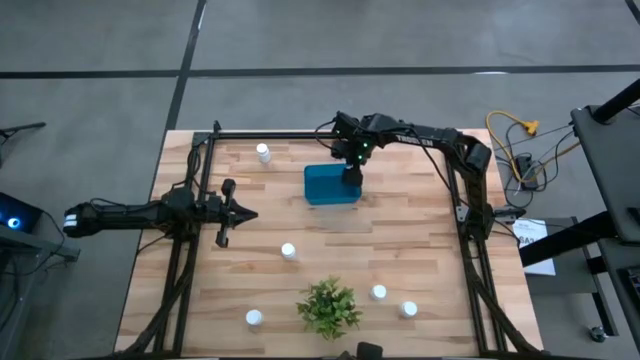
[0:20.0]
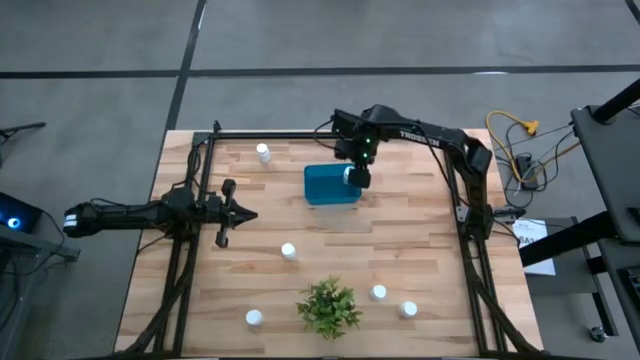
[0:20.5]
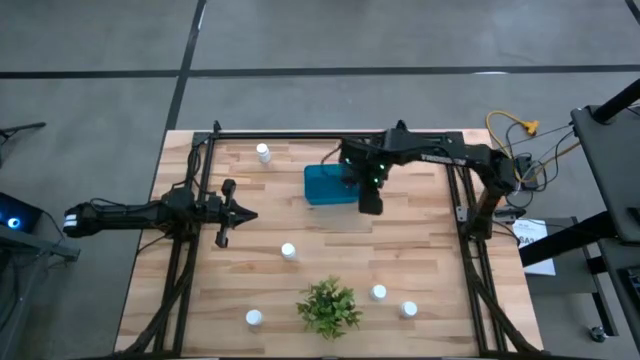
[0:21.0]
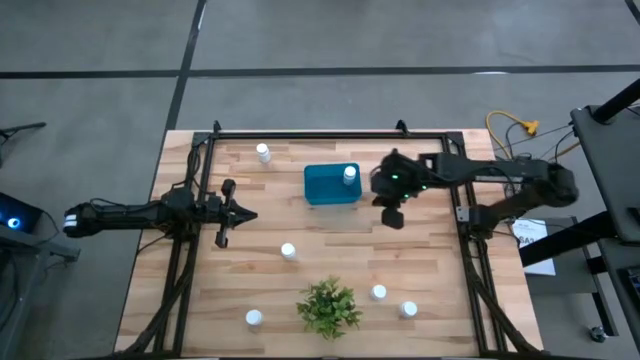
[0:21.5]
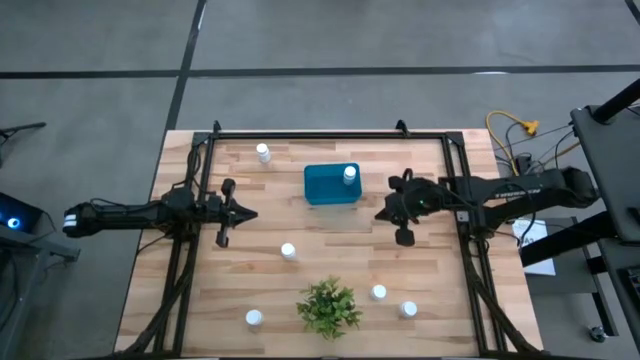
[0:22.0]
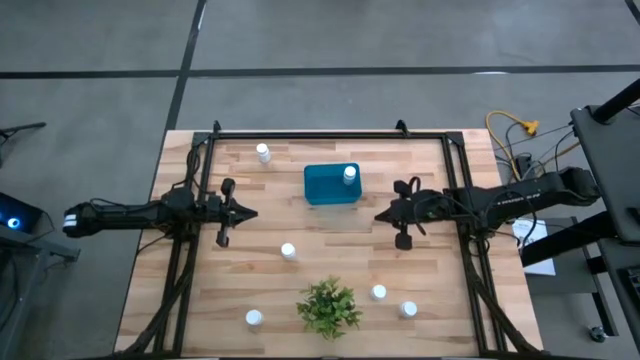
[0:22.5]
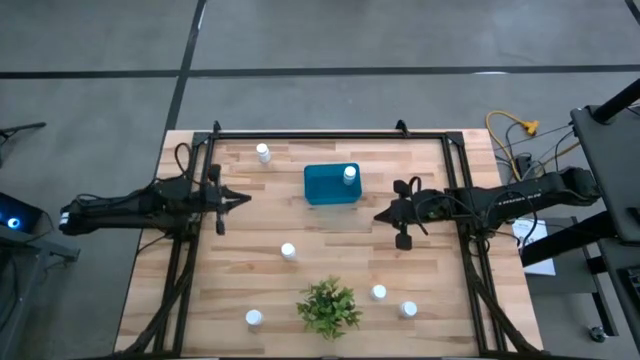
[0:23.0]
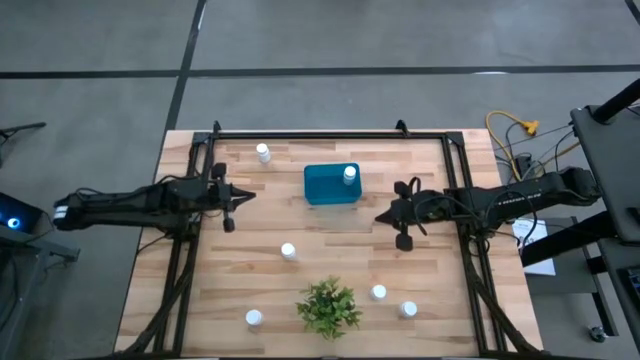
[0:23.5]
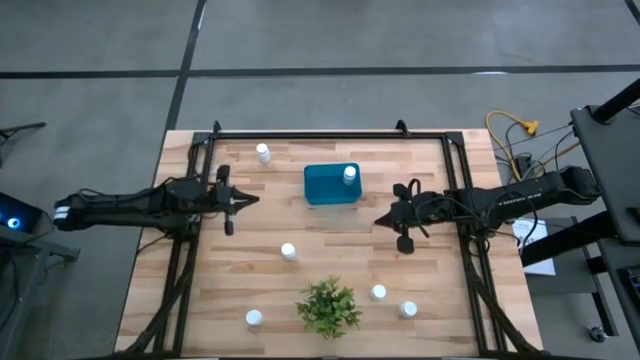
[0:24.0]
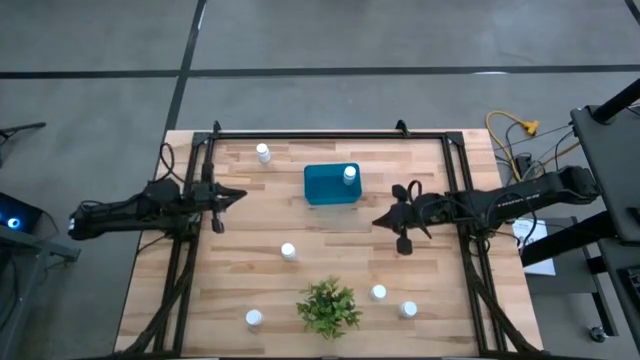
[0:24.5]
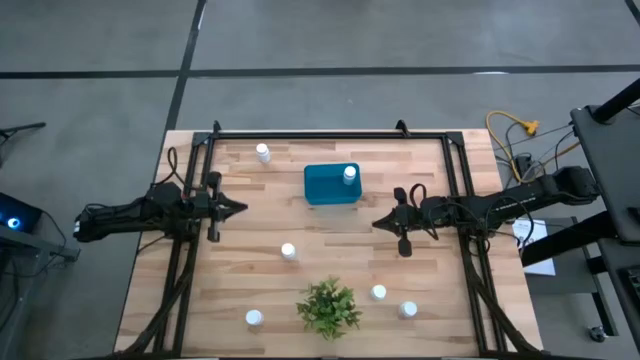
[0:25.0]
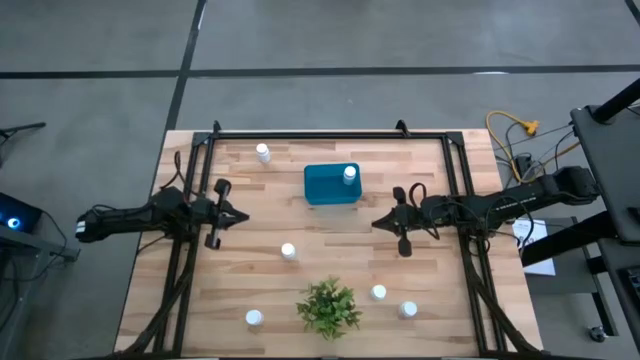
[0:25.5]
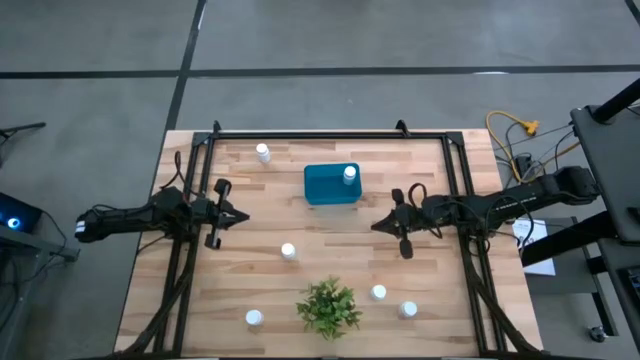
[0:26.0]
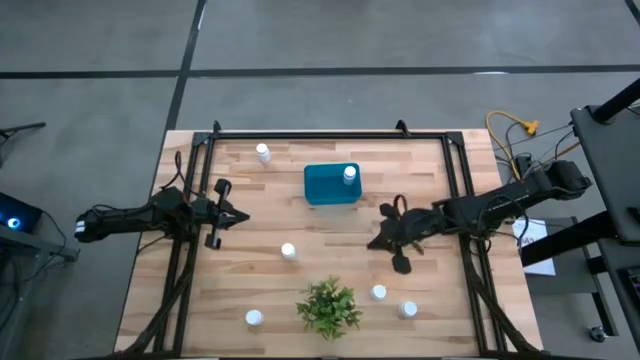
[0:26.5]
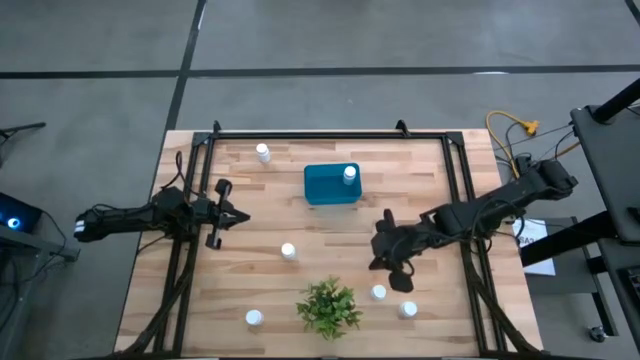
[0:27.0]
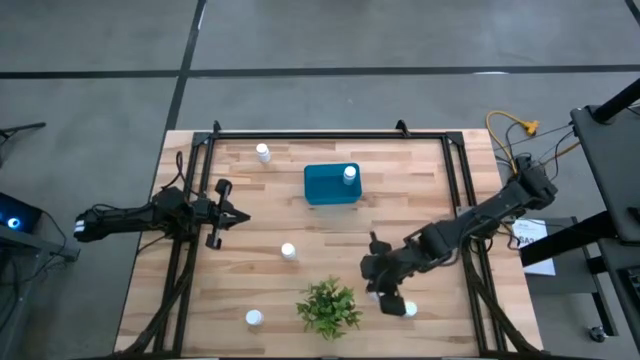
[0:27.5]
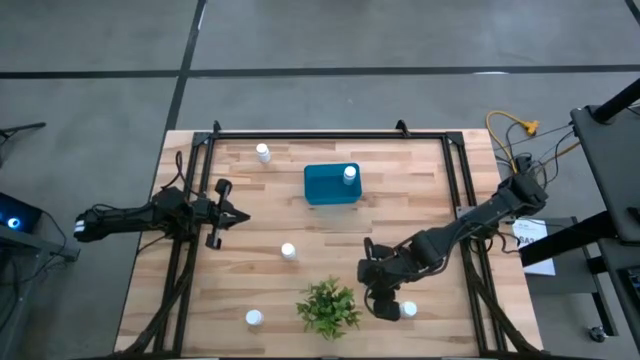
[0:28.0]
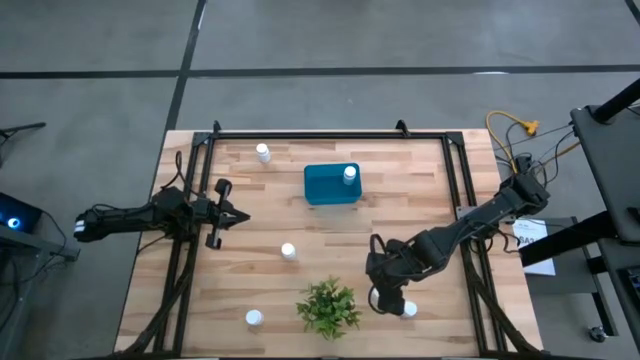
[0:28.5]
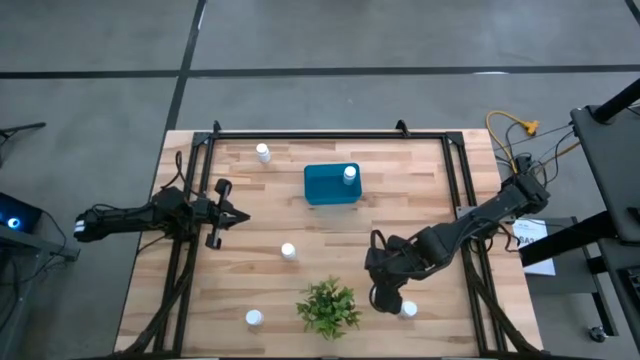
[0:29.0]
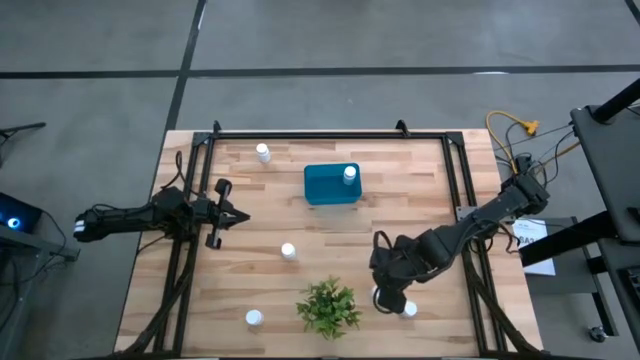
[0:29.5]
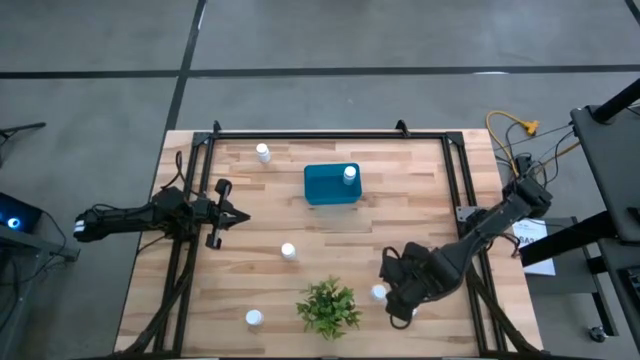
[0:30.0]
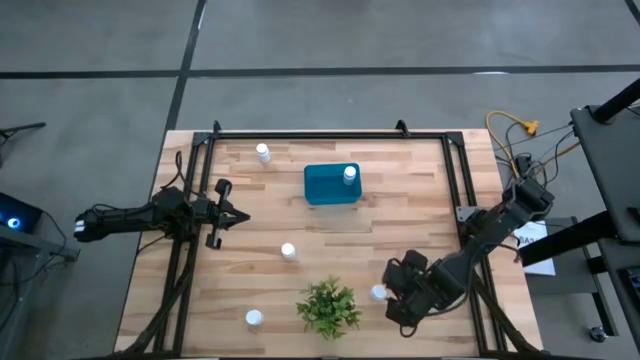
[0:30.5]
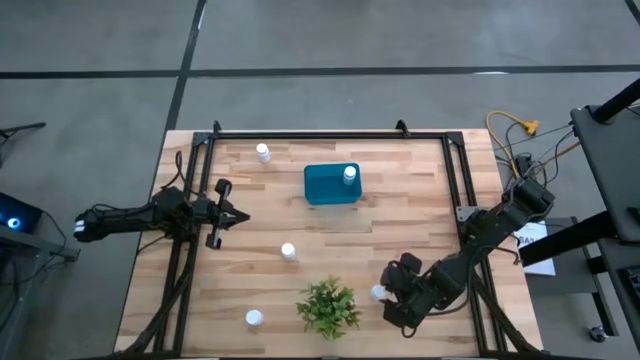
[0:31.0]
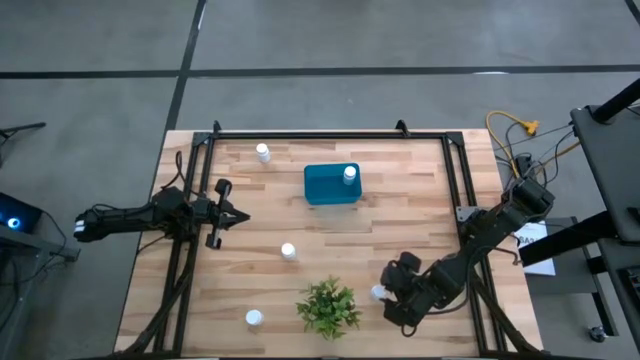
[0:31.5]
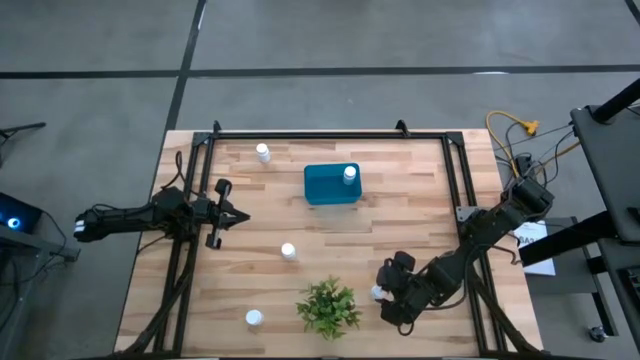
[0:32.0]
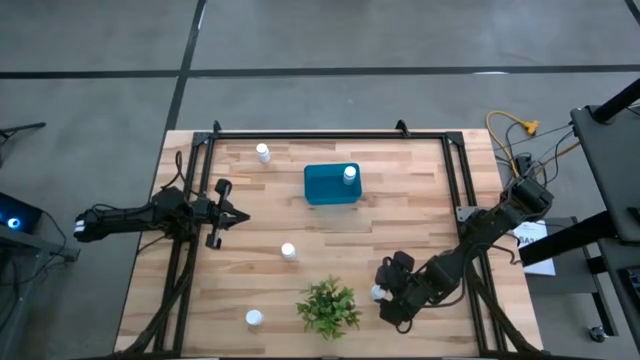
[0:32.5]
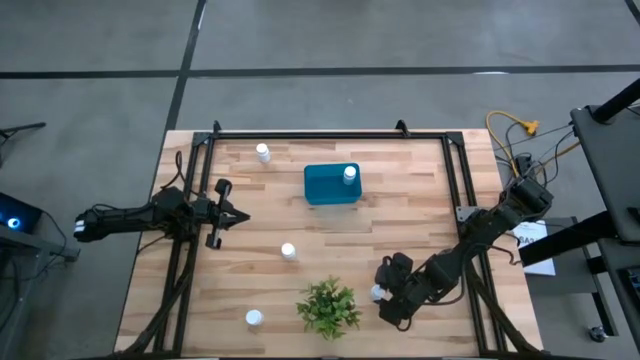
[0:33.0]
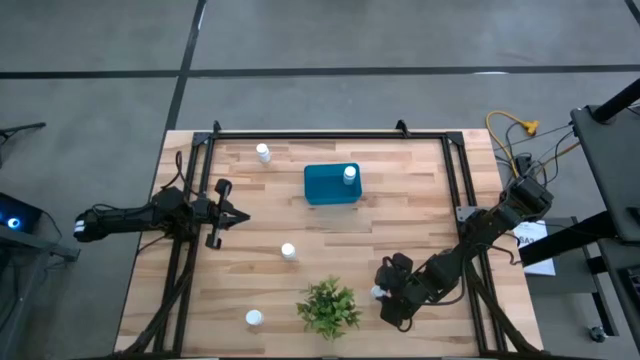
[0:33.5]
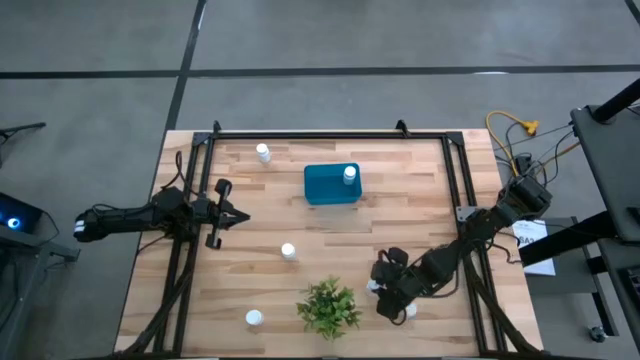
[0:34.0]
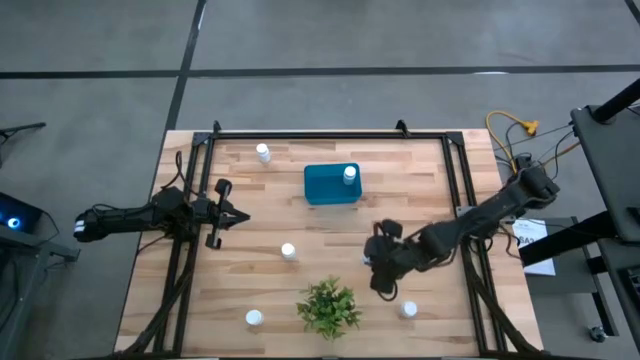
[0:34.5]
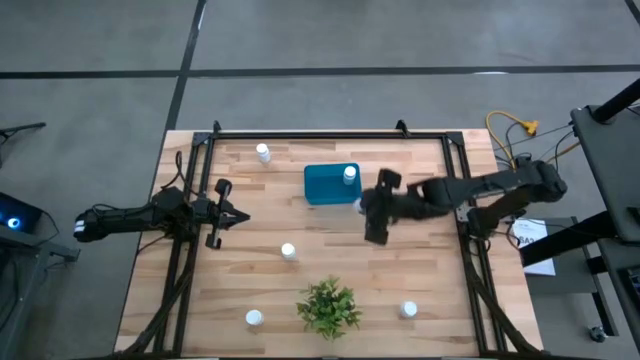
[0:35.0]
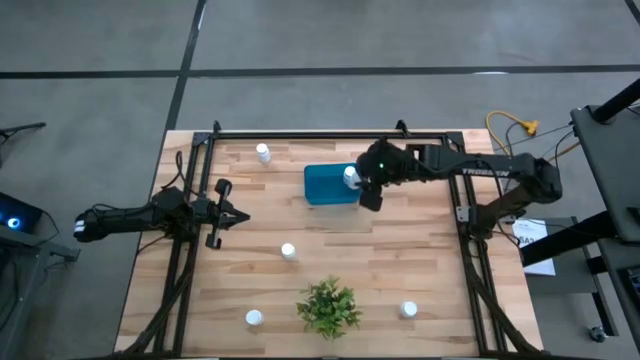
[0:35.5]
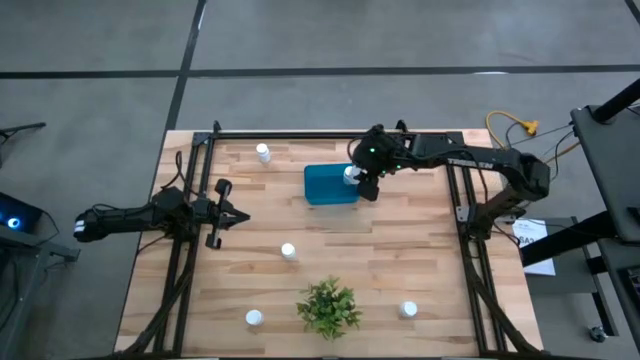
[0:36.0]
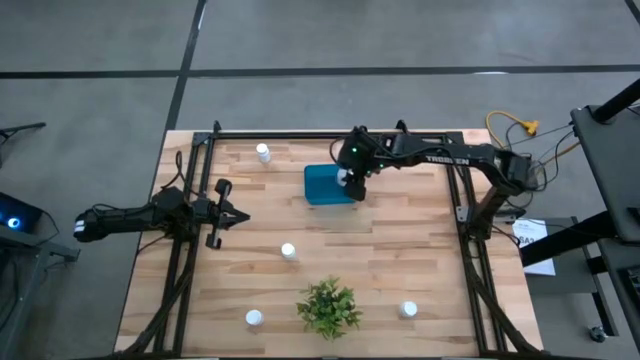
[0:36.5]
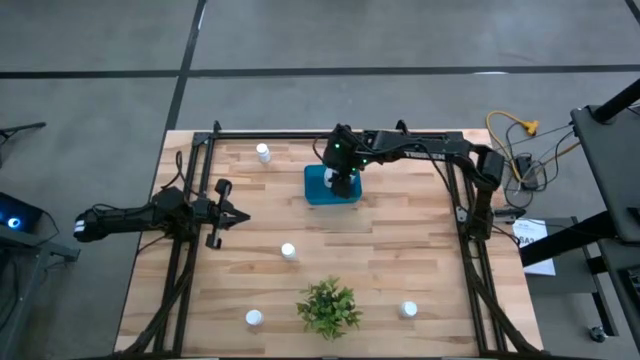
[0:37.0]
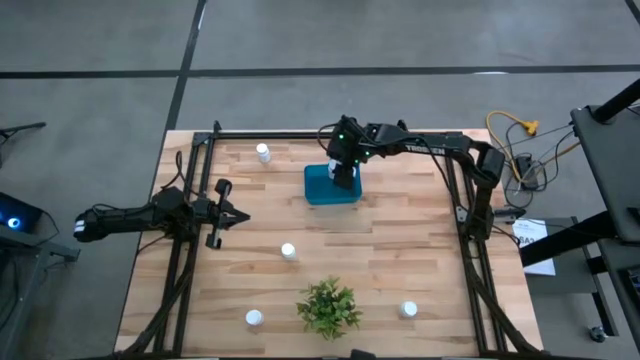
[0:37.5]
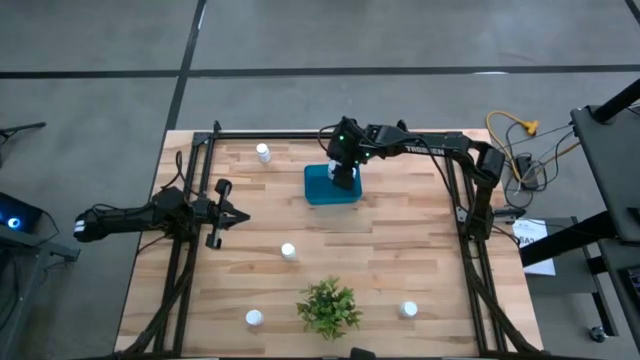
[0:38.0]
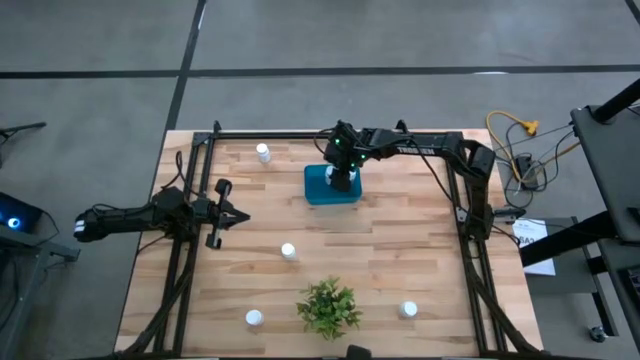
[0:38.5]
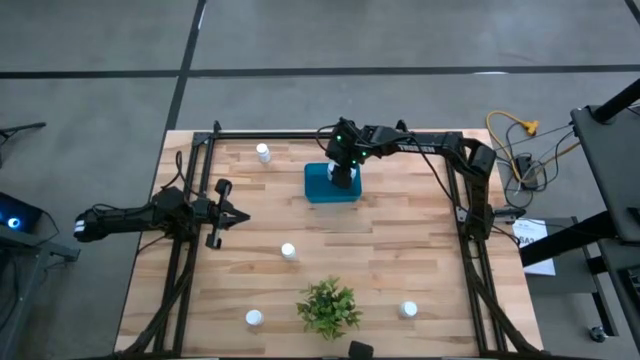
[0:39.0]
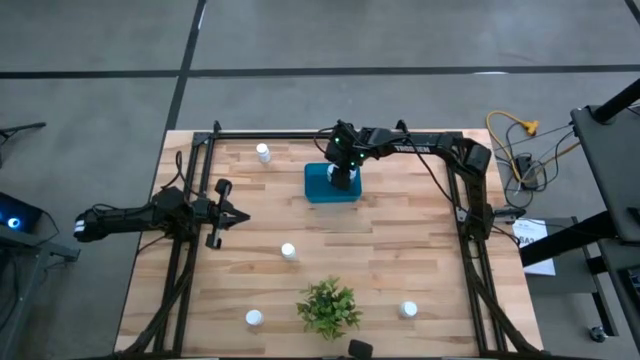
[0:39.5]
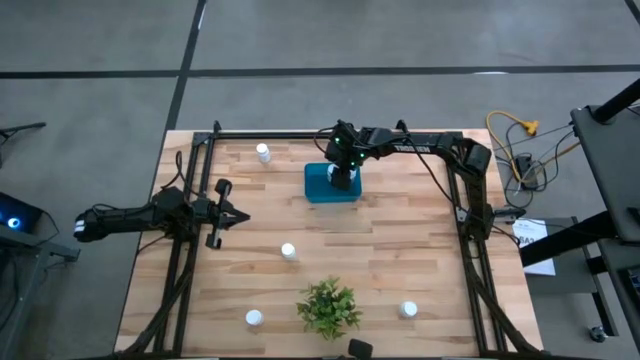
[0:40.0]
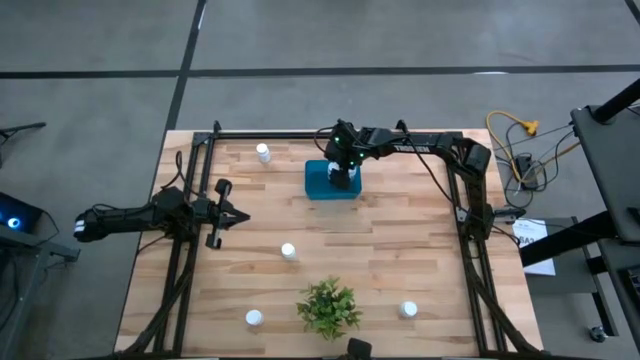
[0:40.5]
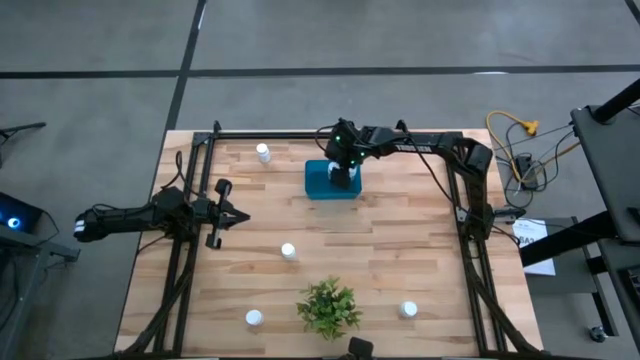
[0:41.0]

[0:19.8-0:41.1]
Task: Pick and place pill bottles into a basket
Put the white pill bottle into the blue bin
